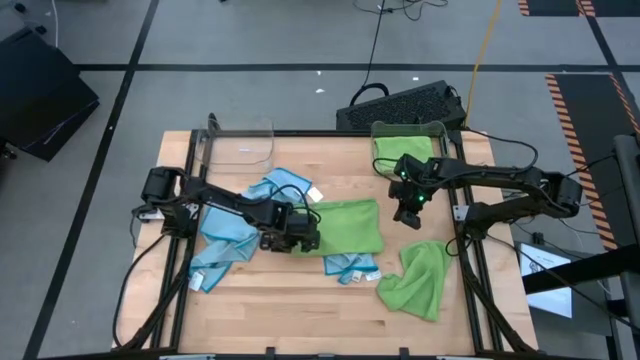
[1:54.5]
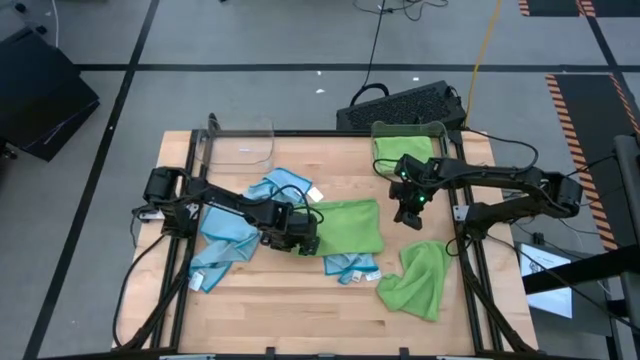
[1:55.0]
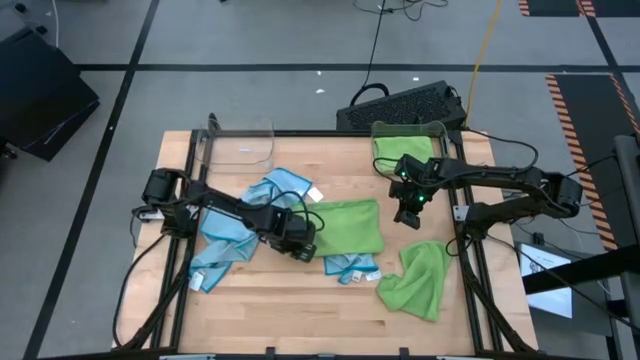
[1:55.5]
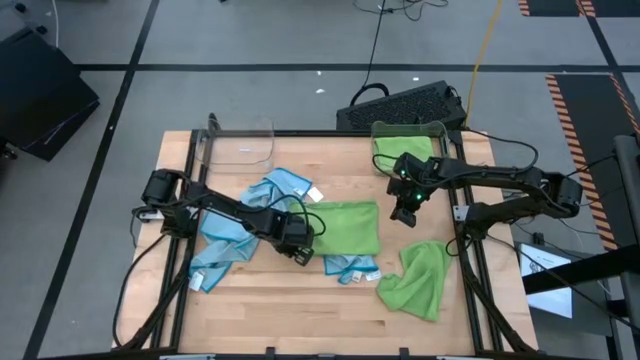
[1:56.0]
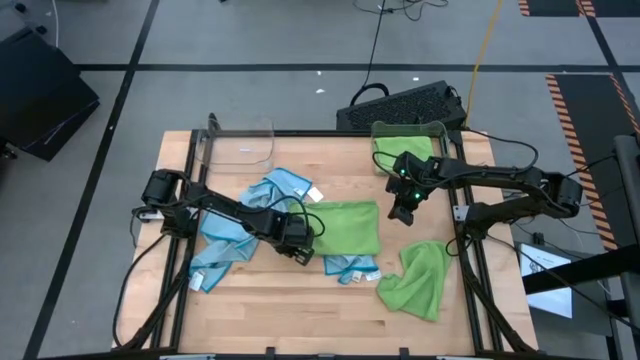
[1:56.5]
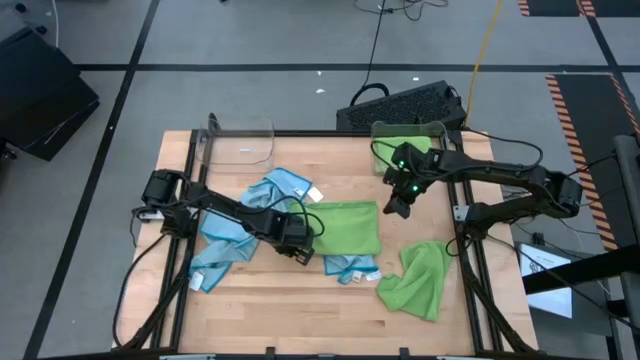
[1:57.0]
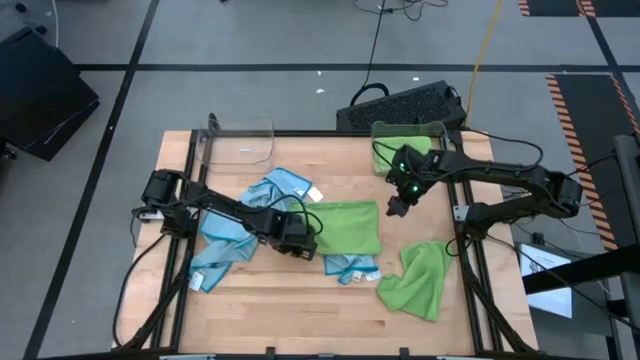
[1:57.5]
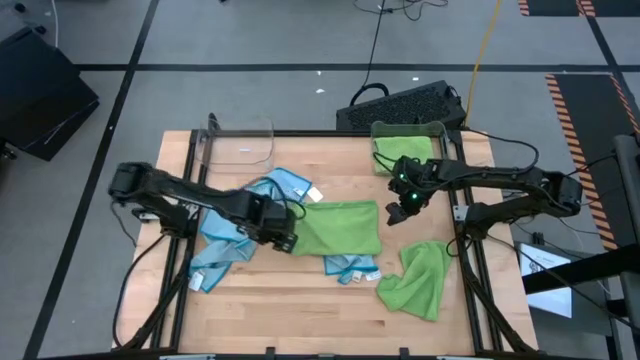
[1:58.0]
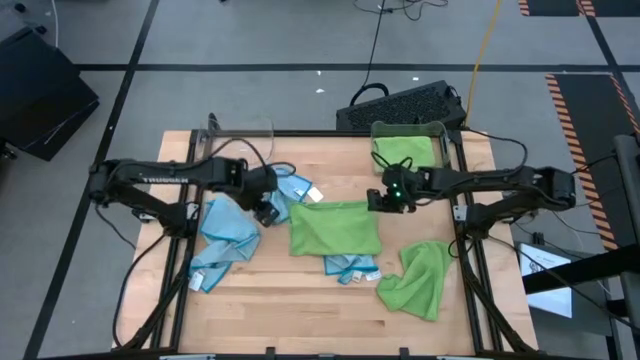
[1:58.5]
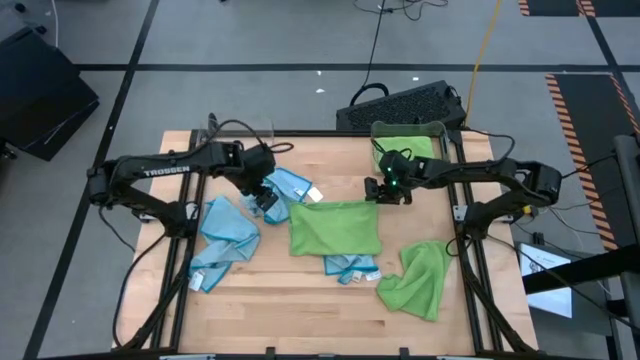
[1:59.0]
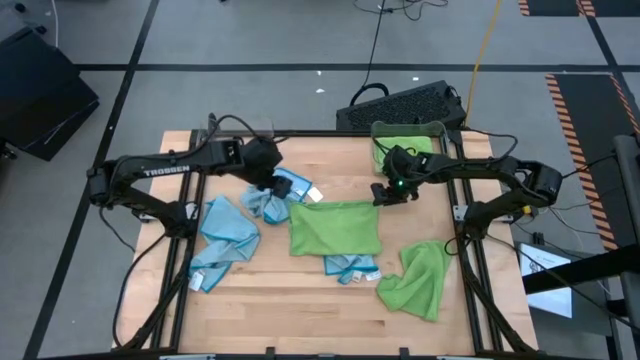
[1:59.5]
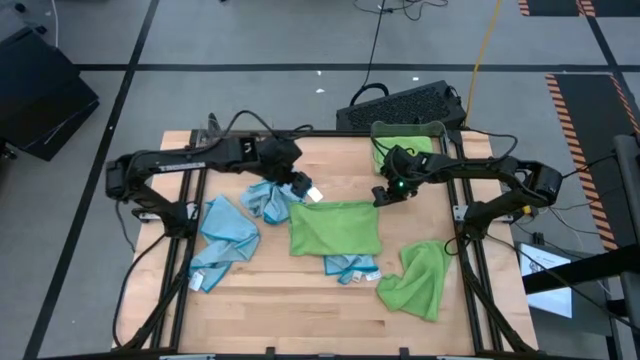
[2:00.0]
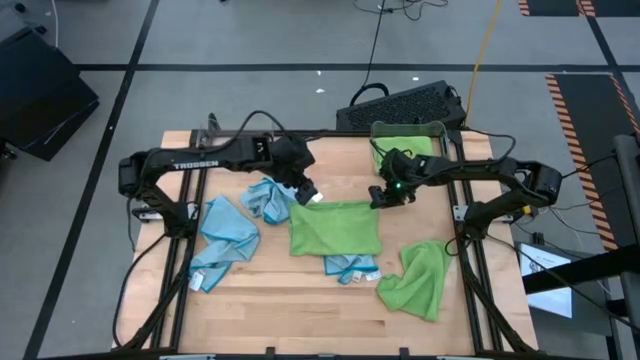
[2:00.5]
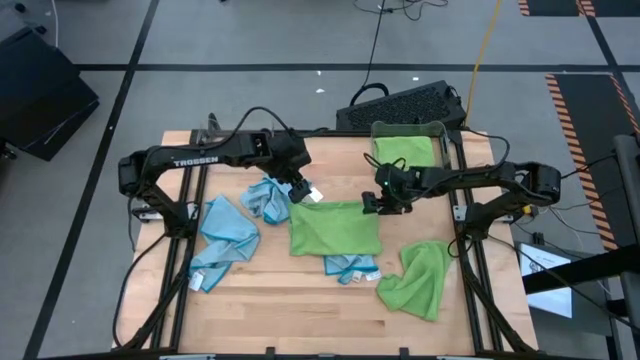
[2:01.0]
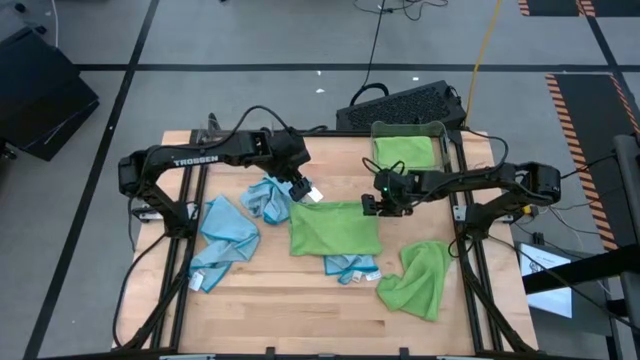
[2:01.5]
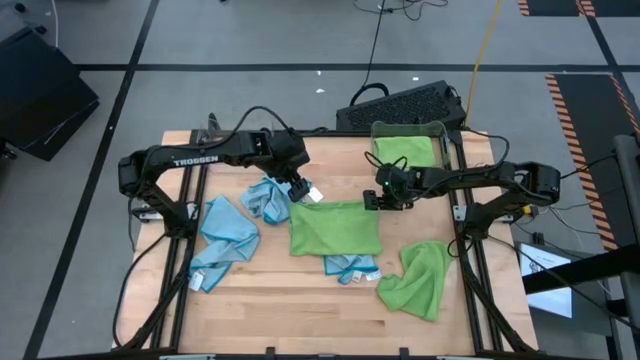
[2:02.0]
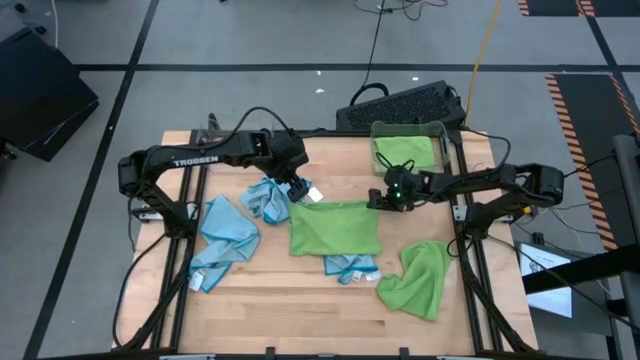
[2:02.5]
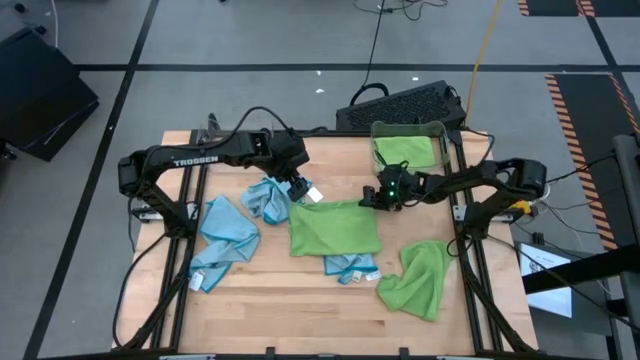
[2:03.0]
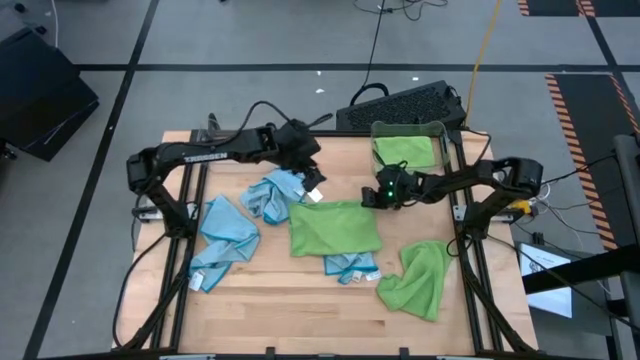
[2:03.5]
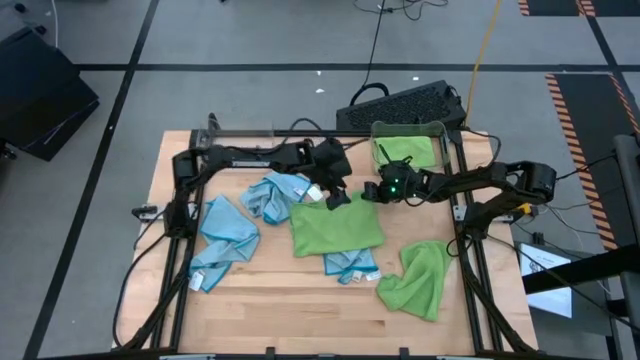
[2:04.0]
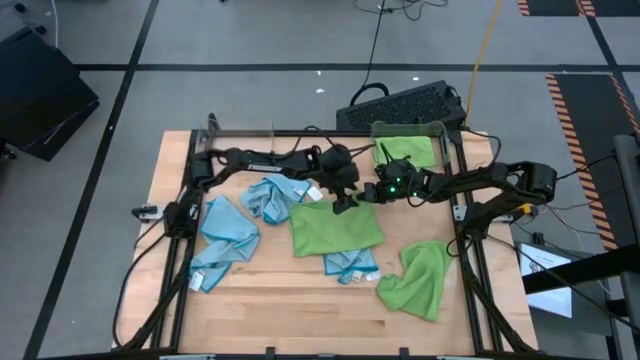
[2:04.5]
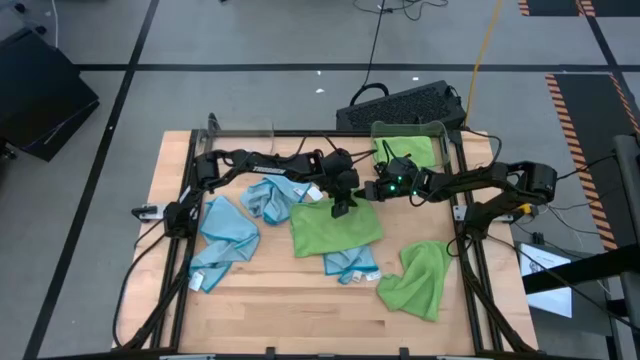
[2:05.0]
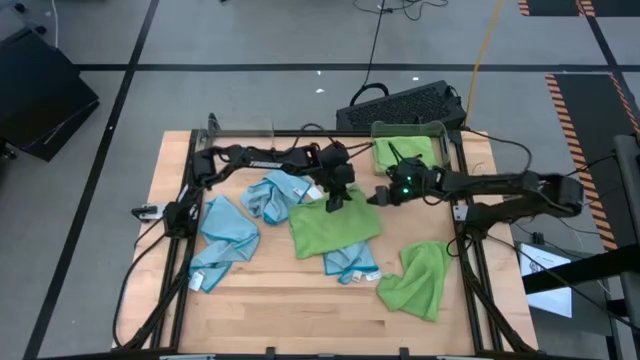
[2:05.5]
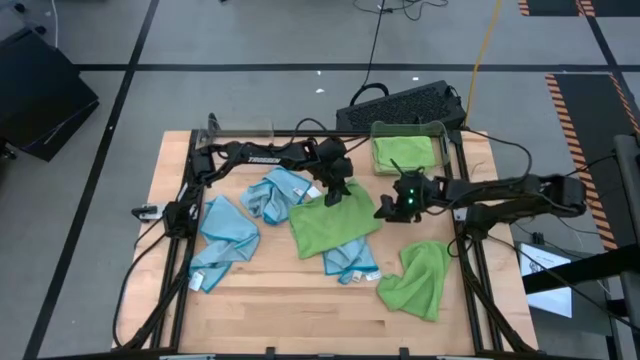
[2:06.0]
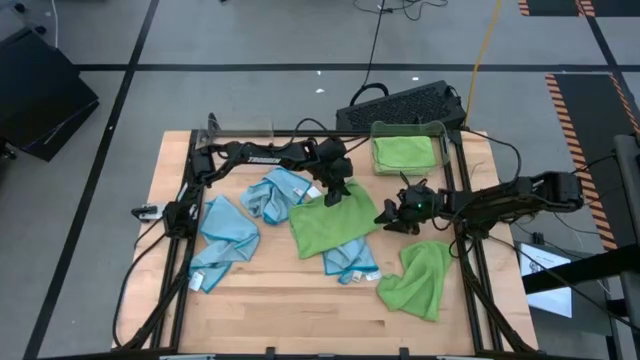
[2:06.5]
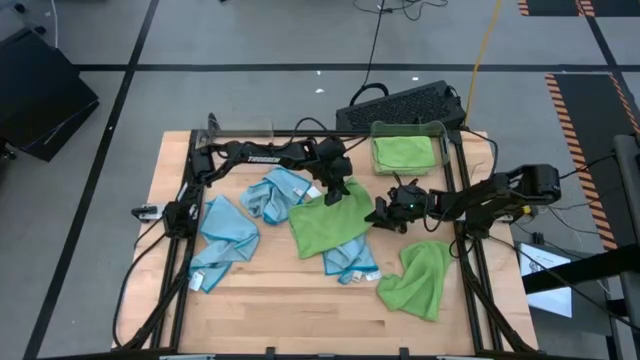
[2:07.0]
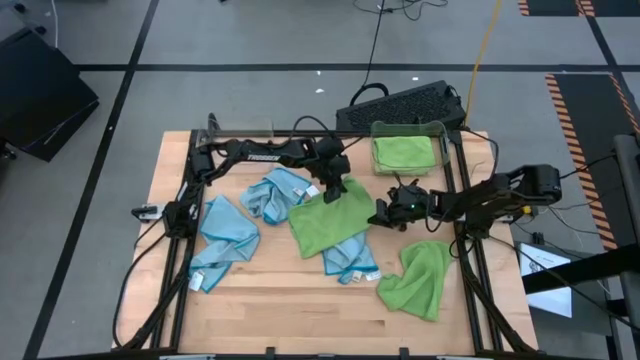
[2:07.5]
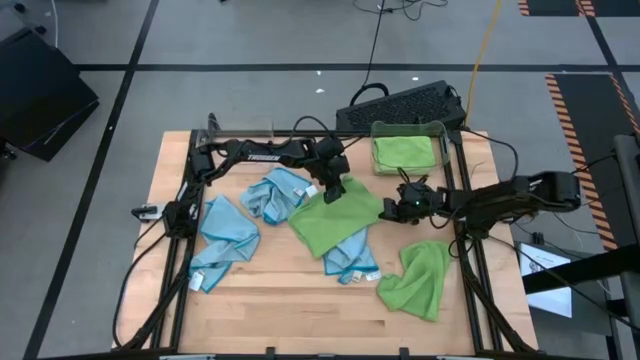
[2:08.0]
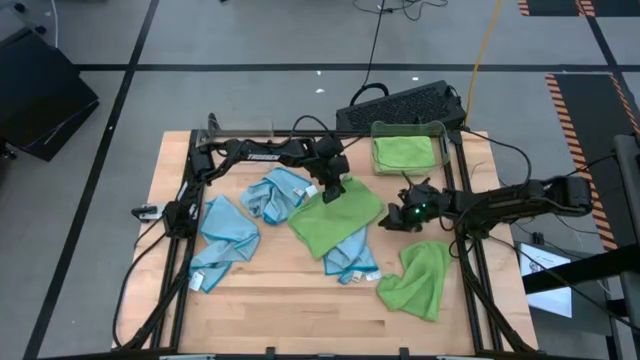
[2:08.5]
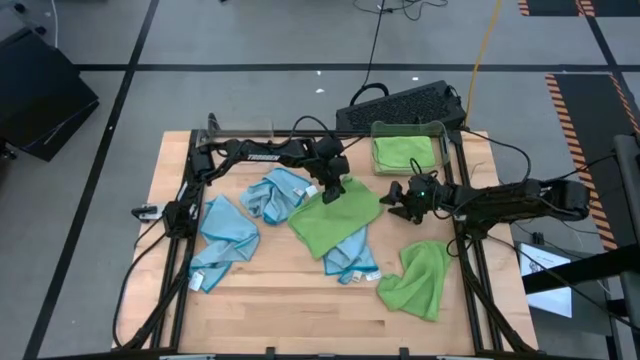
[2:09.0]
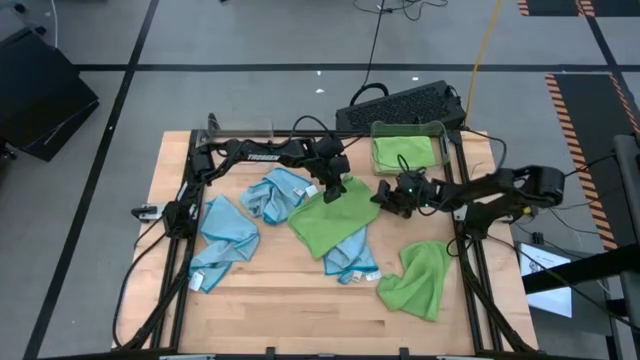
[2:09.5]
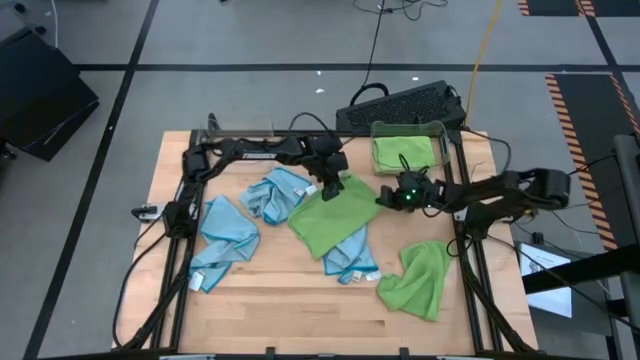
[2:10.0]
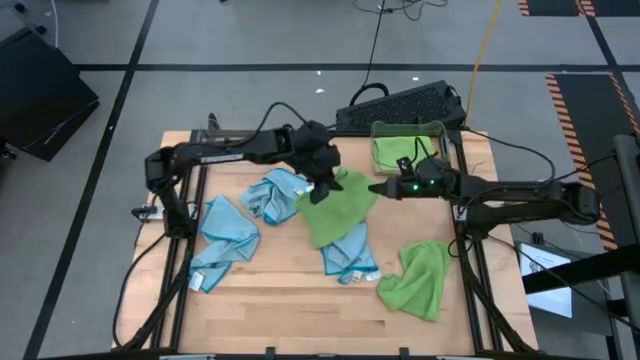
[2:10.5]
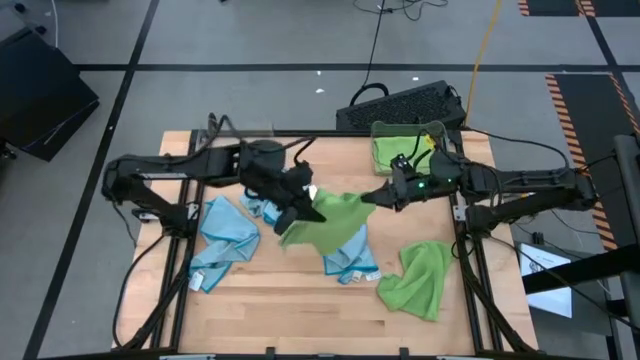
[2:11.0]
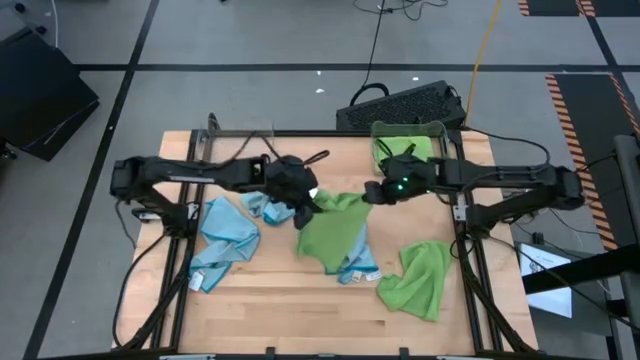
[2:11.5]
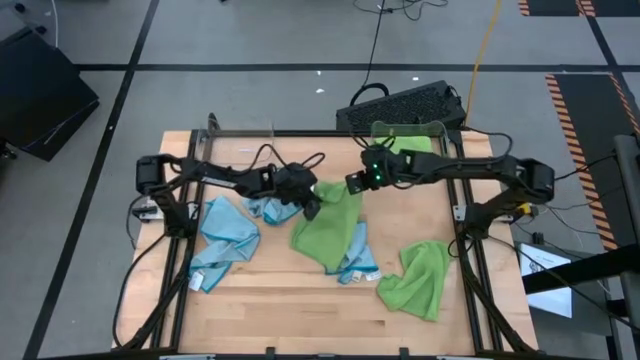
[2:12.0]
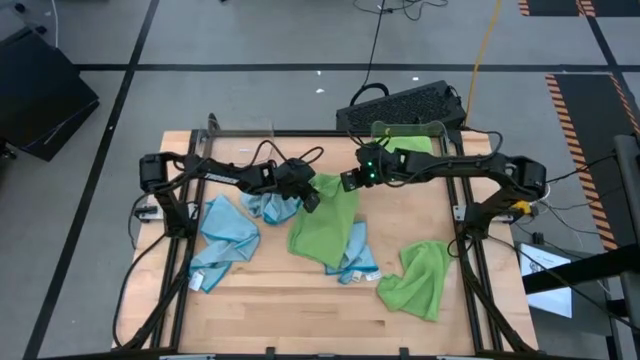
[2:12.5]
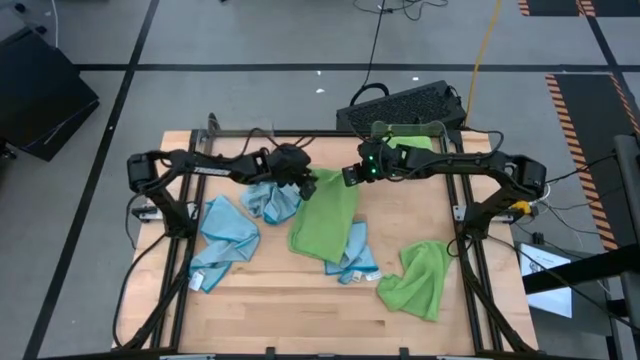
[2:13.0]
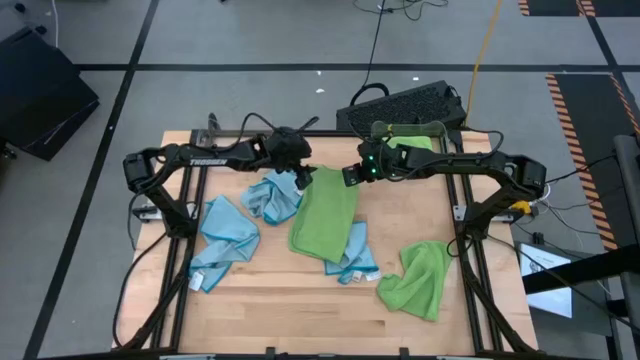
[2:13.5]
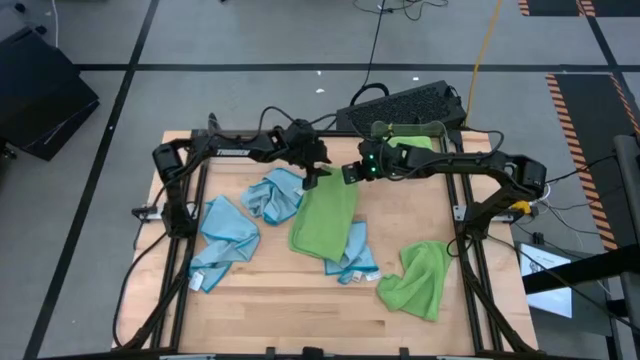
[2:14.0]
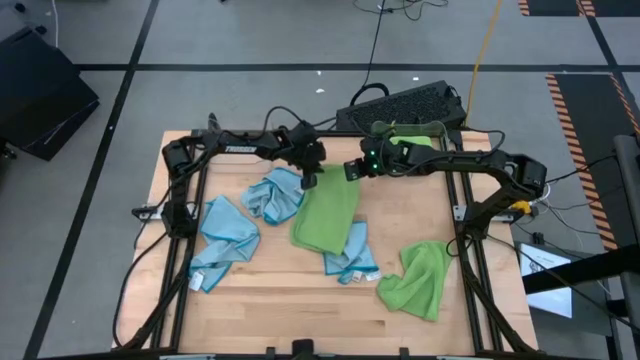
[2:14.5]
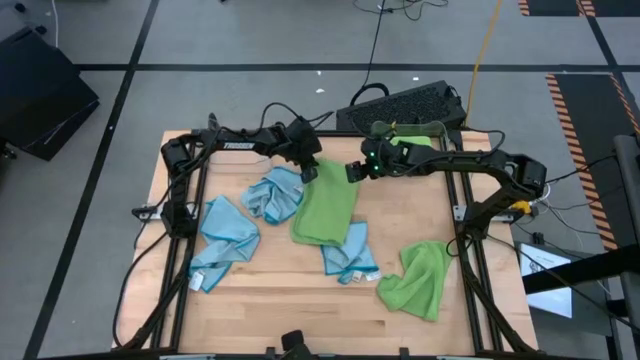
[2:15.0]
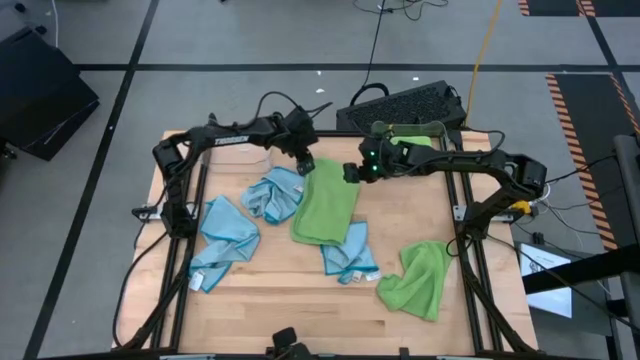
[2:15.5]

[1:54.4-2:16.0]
Task: Sort microfiber towel by color & place in baskets
Fold the left green towel
